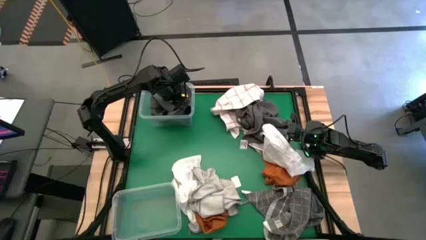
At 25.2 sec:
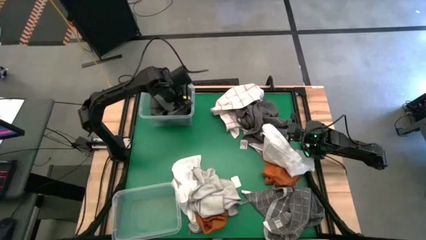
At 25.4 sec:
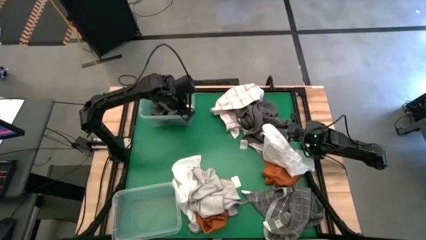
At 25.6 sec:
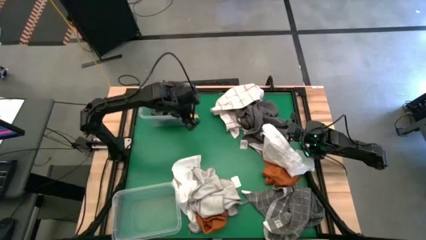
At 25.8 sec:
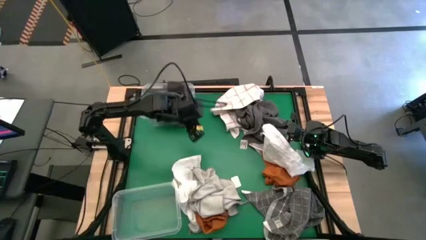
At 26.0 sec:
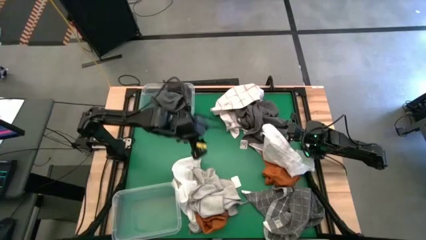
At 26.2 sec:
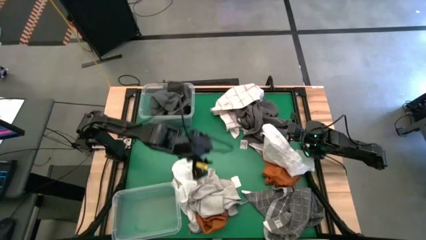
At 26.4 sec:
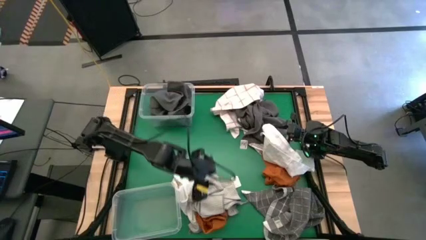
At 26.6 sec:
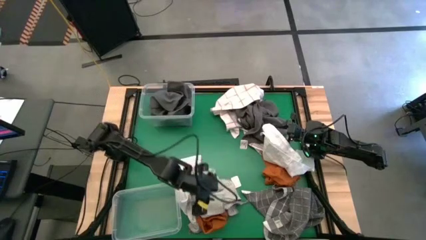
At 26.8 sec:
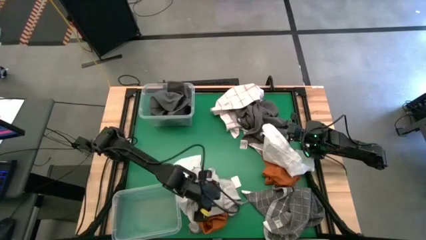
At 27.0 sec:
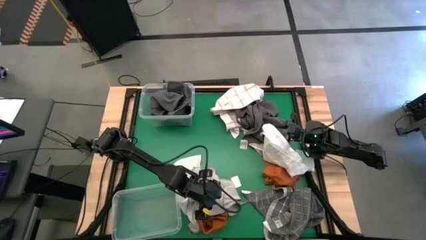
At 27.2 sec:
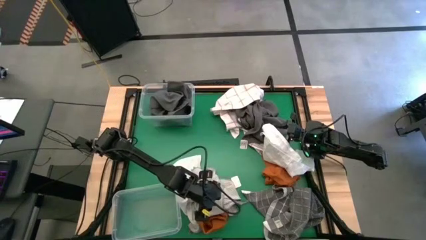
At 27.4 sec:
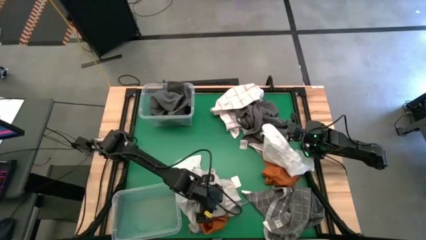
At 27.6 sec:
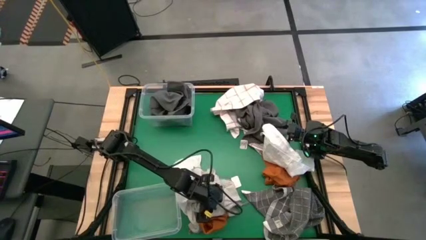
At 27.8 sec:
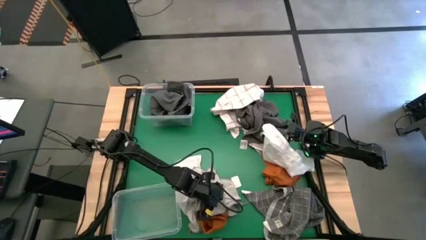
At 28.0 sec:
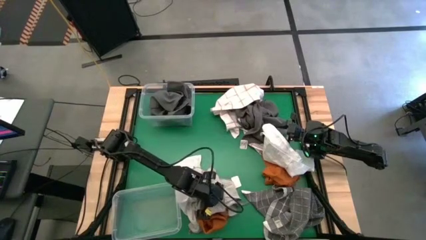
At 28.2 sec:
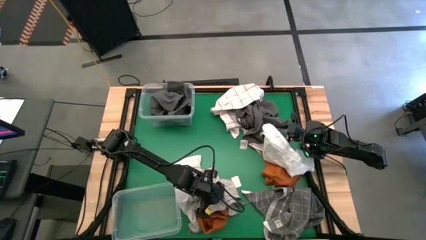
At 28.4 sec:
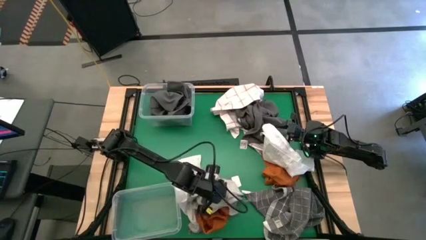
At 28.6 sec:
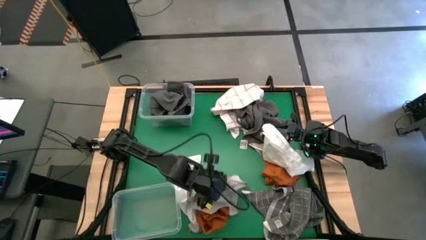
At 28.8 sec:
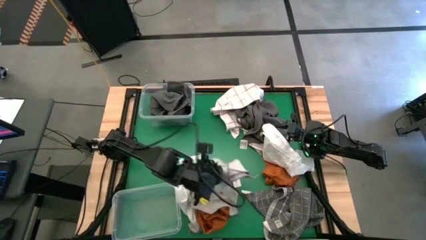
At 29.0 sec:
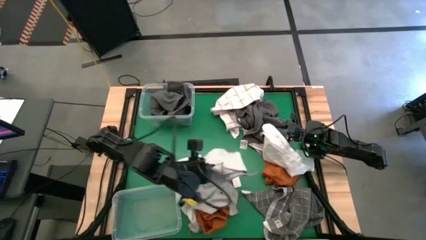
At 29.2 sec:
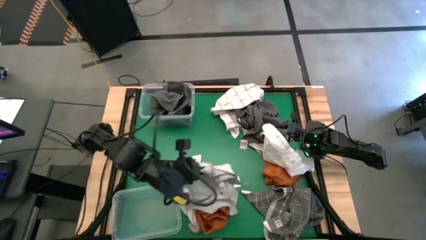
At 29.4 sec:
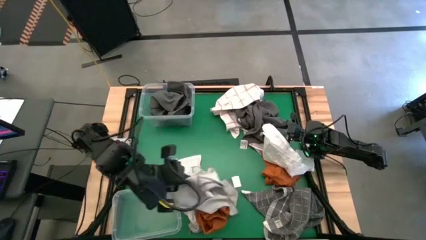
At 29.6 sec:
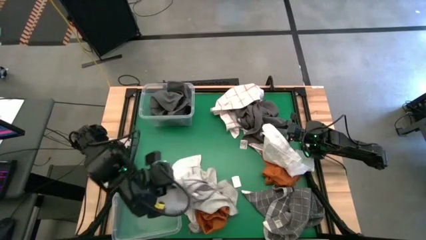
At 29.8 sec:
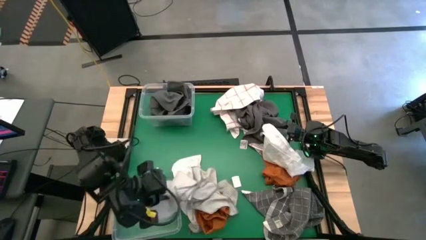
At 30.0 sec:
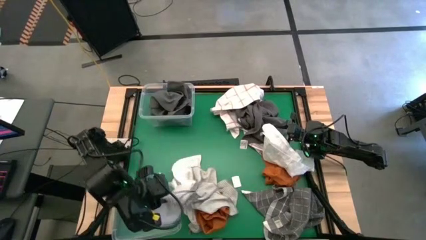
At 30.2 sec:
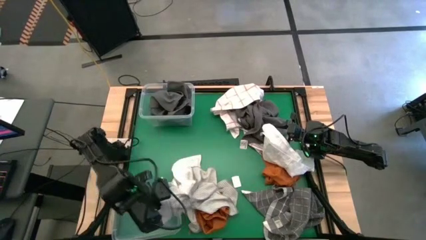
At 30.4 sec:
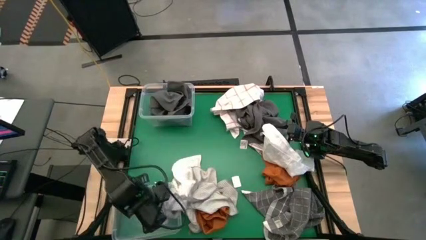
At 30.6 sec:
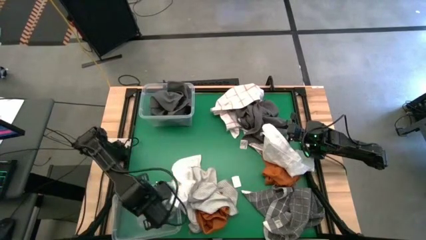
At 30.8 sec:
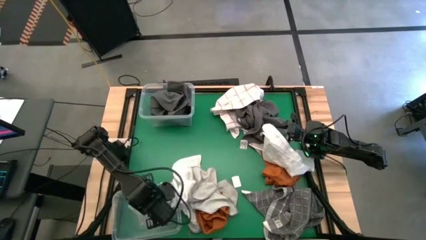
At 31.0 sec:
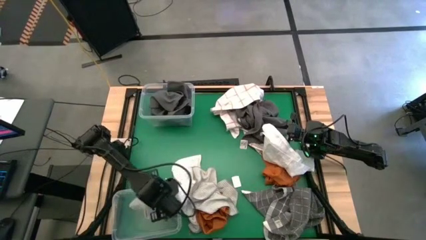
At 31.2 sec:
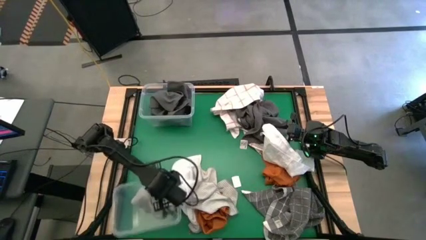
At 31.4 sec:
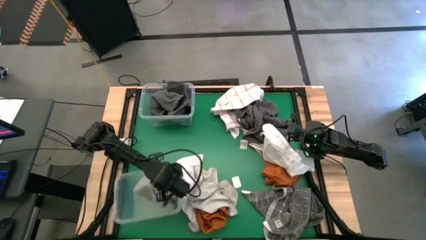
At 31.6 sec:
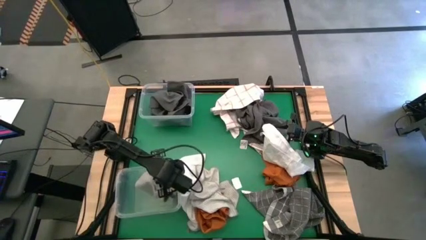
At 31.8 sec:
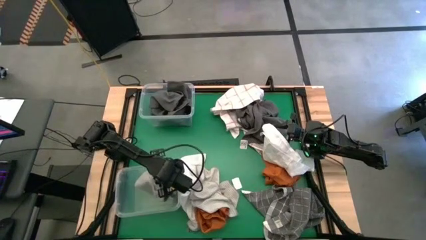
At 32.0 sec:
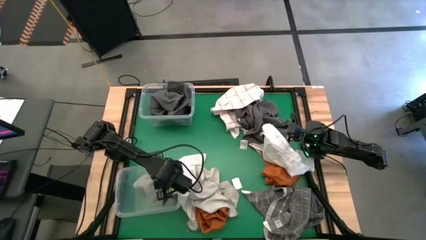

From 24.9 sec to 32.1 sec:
Task: Sort towels by color in basket
Put the gray towel into the bottom transparent bin

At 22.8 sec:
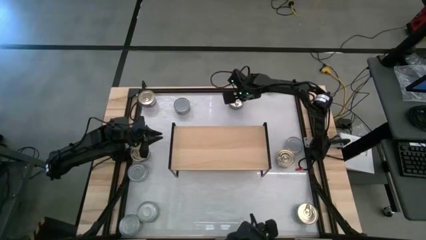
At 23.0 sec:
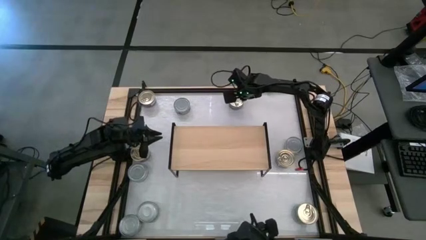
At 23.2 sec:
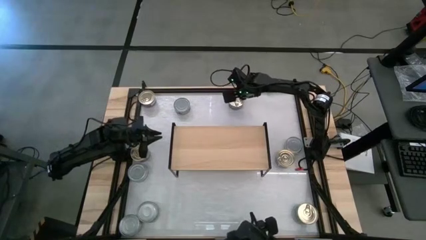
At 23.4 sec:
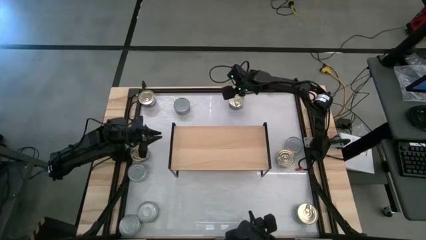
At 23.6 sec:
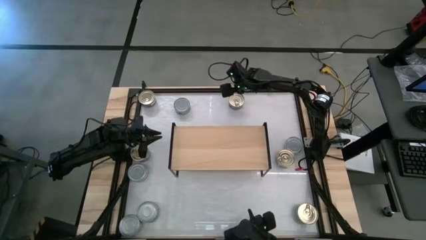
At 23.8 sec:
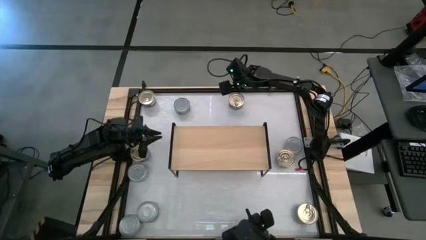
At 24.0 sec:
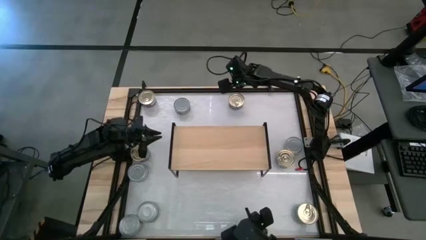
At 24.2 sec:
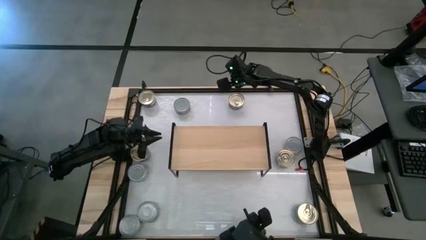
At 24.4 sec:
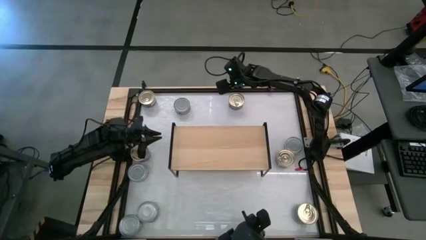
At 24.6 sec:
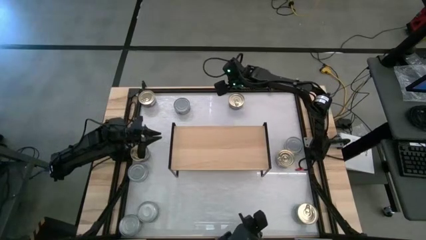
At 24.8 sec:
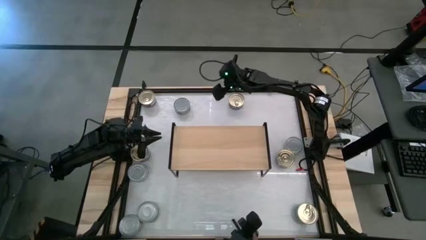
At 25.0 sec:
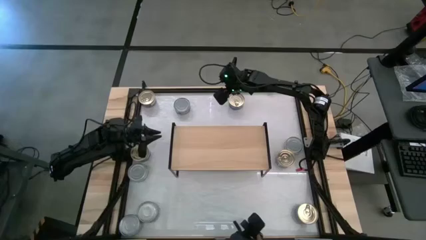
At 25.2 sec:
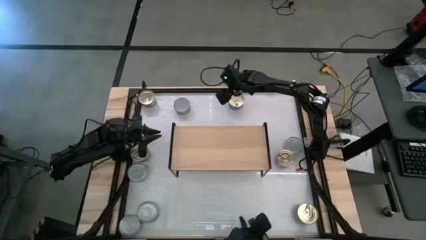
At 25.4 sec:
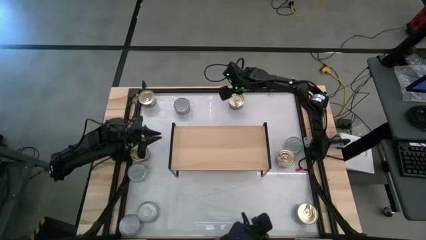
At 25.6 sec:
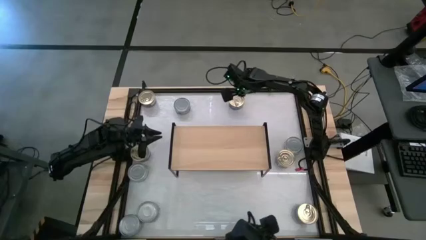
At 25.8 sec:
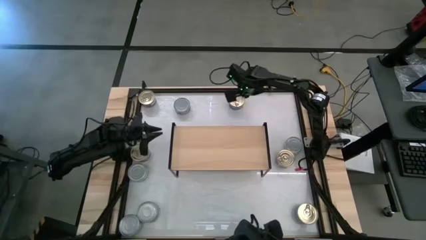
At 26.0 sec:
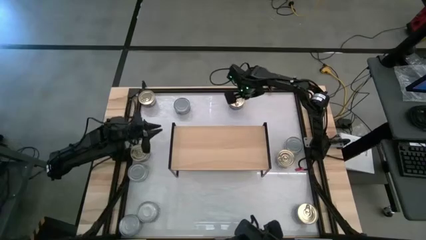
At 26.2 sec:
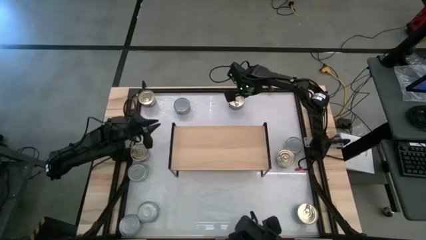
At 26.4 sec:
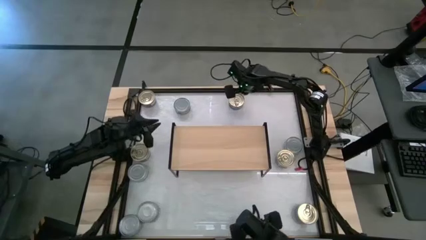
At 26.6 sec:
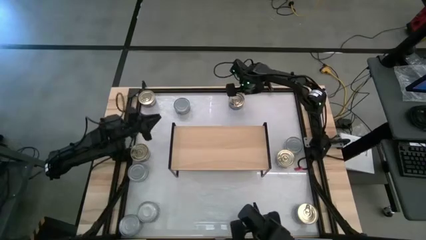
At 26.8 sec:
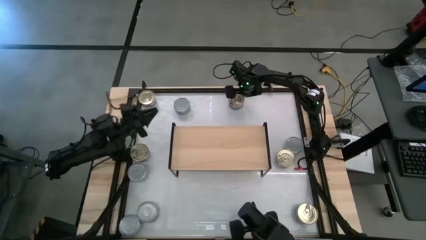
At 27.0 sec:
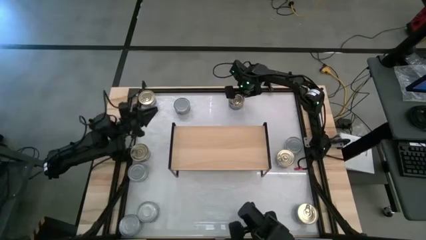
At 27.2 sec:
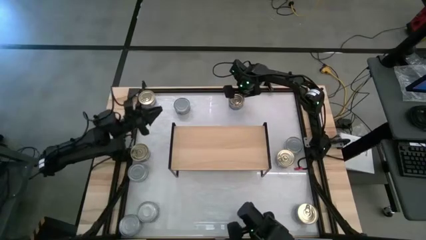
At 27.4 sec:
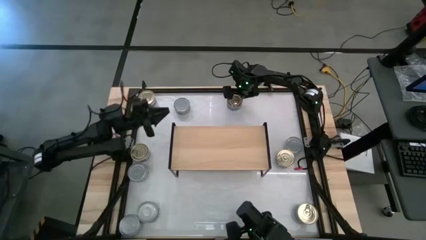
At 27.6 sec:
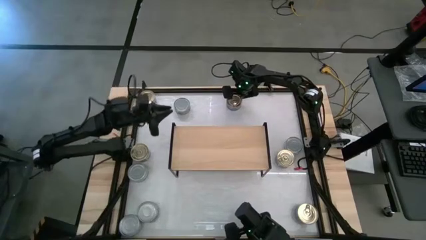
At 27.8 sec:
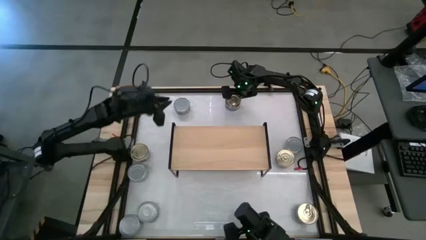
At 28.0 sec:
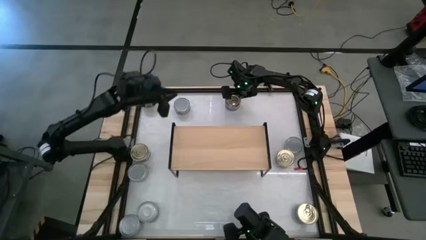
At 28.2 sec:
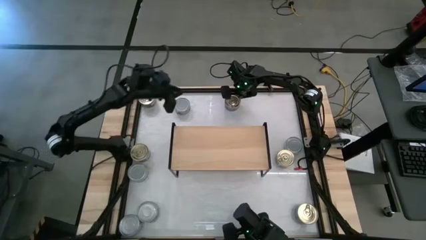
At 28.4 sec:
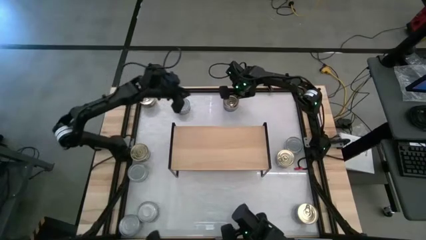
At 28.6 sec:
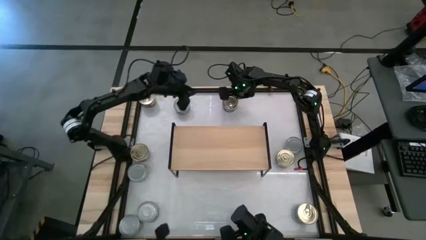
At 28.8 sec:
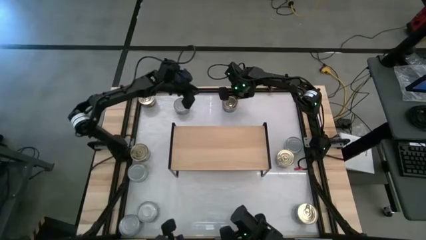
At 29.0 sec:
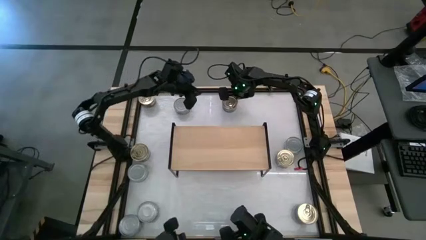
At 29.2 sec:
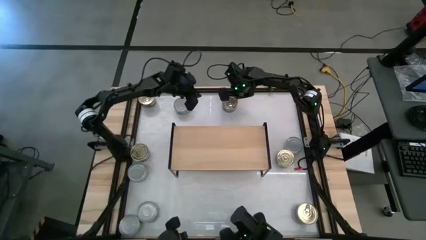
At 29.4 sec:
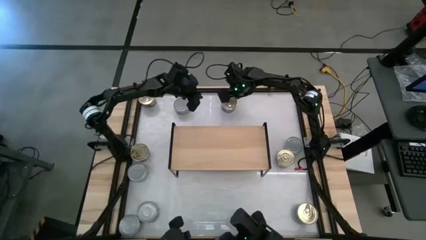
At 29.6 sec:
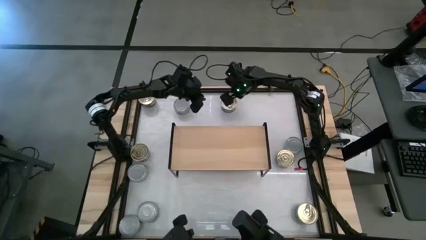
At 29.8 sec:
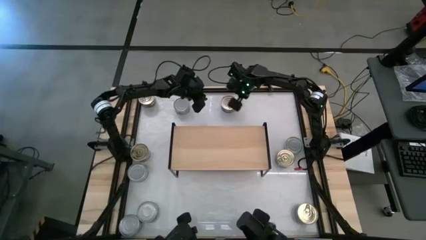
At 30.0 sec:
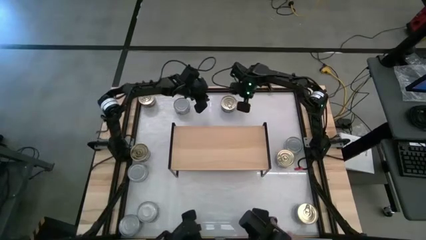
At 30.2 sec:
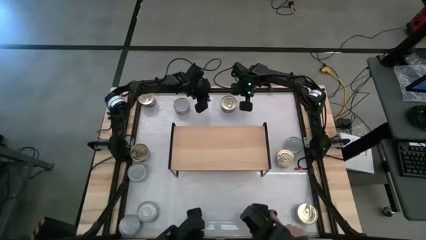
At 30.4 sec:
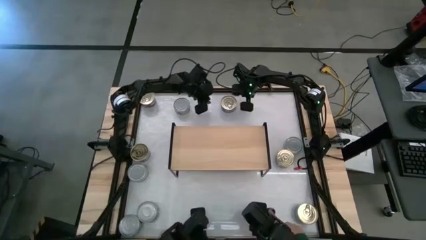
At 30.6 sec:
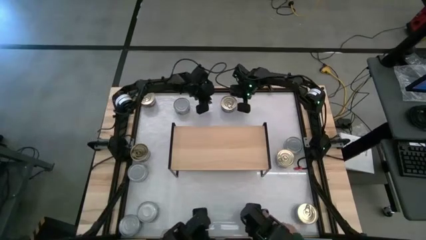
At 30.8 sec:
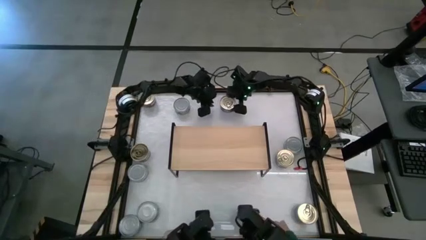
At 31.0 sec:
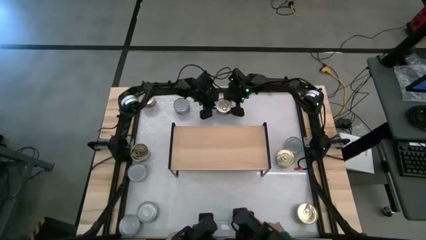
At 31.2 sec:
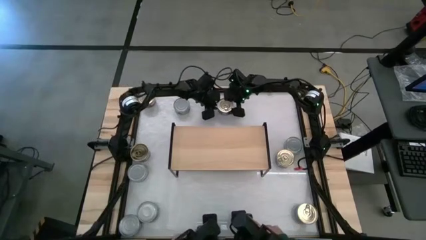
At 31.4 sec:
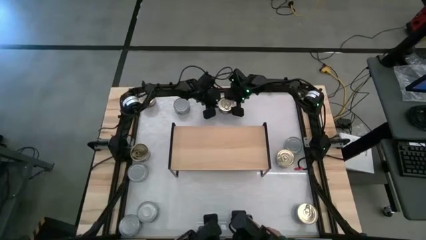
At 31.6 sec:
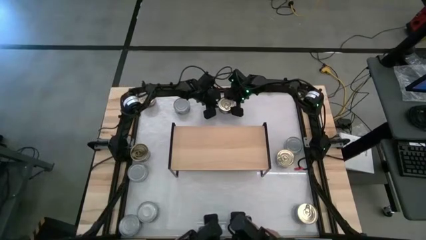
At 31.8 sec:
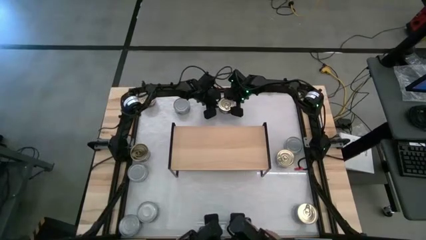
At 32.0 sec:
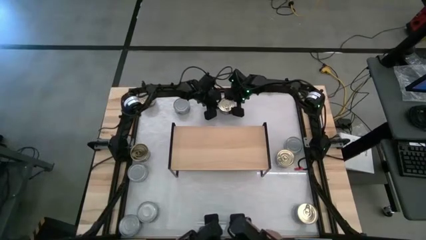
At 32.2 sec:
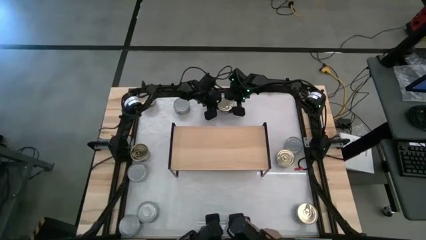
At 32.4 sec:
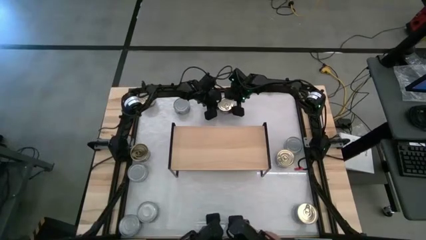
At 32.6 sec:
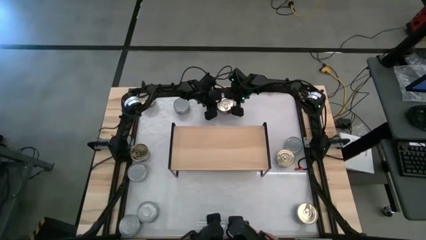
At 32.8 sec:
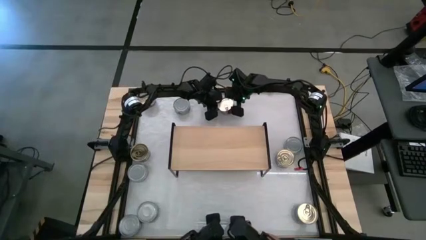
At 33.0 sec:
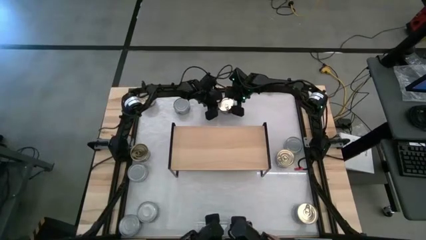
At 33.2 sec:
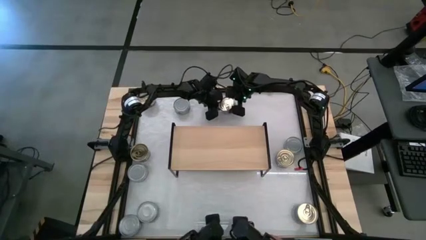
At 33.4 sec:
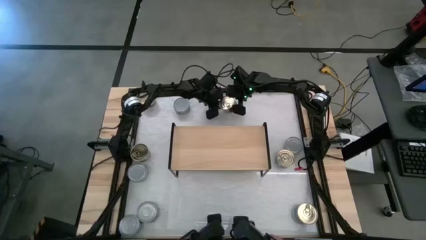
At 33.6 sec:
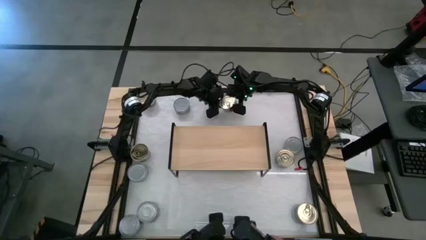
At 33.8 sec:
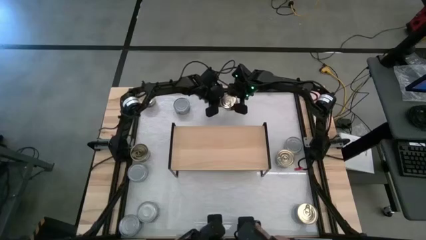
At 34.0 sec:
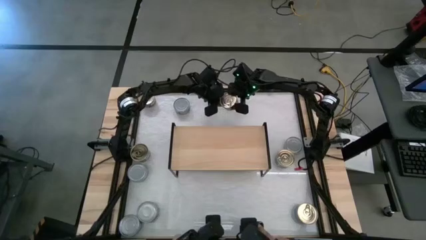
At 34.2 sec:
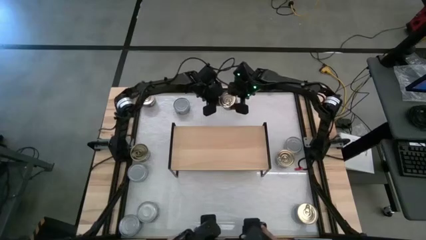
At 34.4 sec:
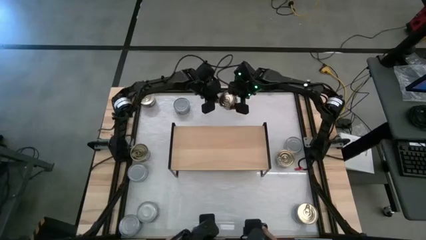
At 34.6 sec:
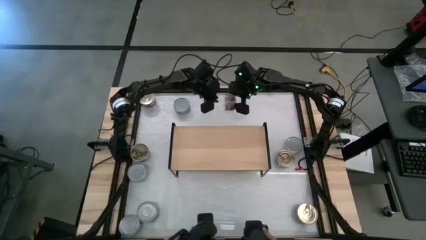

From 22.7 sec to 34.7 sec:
Task: Stack canned seafood by type on shelf
Put the blue-pink tuna can on the shelf
